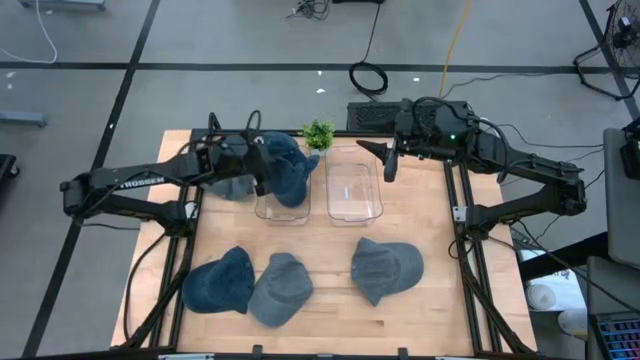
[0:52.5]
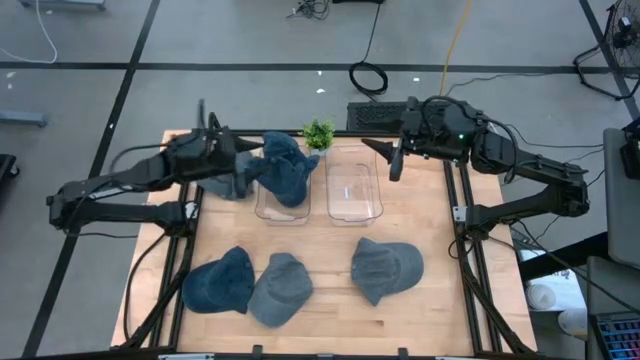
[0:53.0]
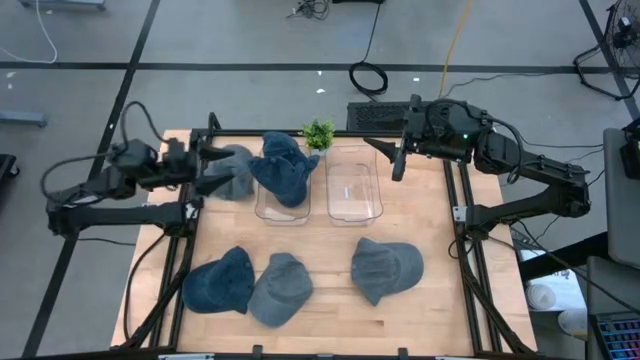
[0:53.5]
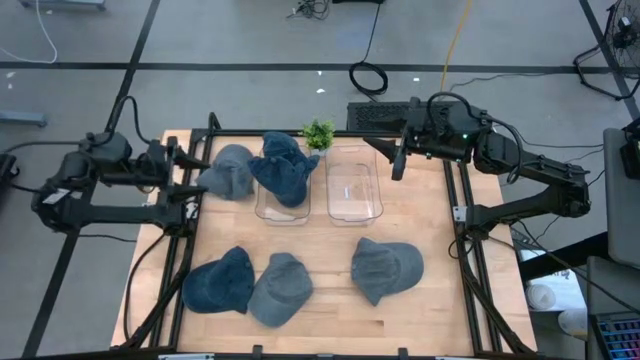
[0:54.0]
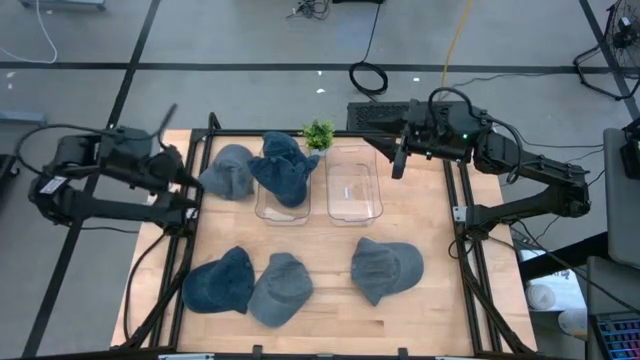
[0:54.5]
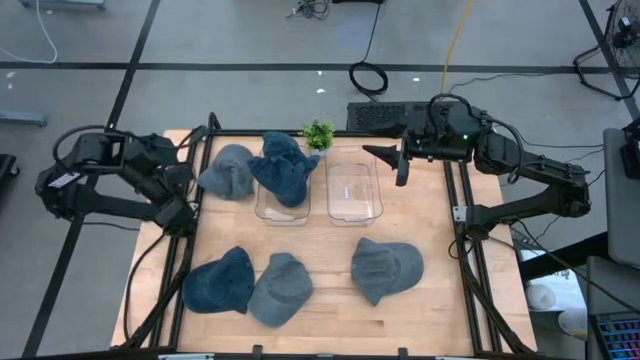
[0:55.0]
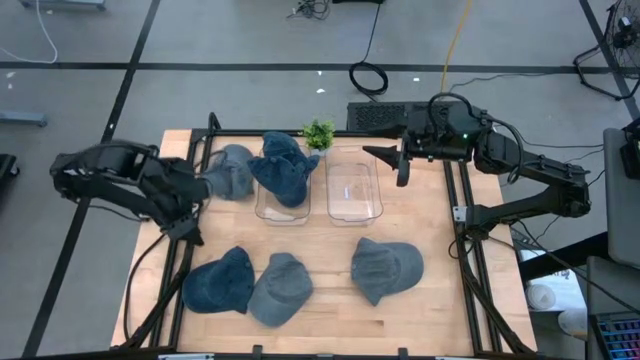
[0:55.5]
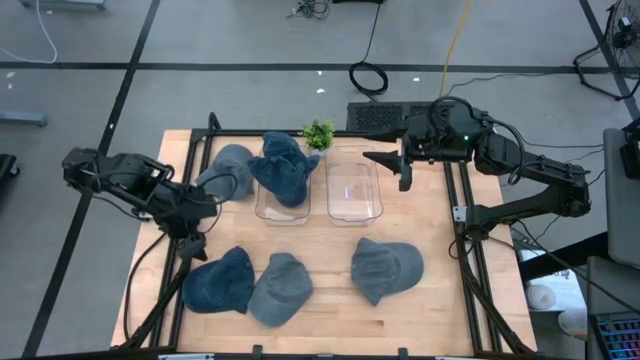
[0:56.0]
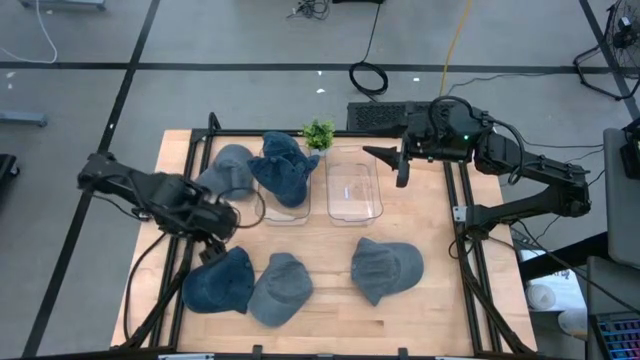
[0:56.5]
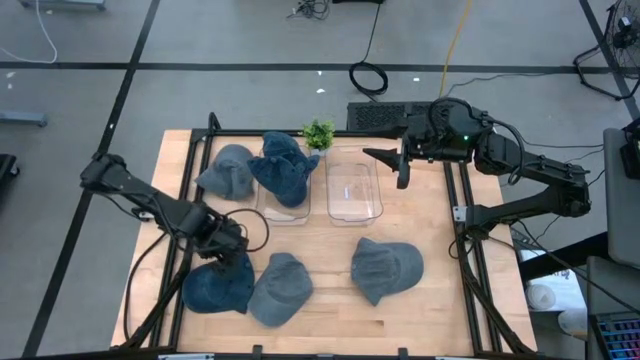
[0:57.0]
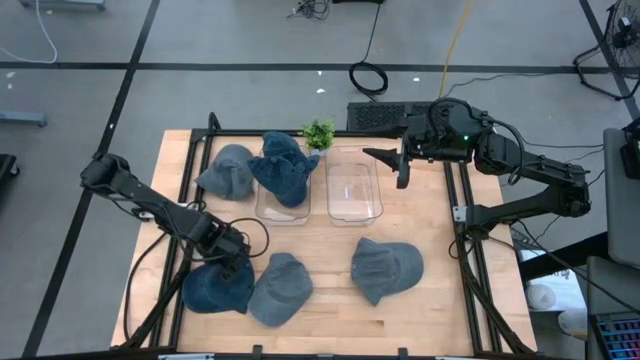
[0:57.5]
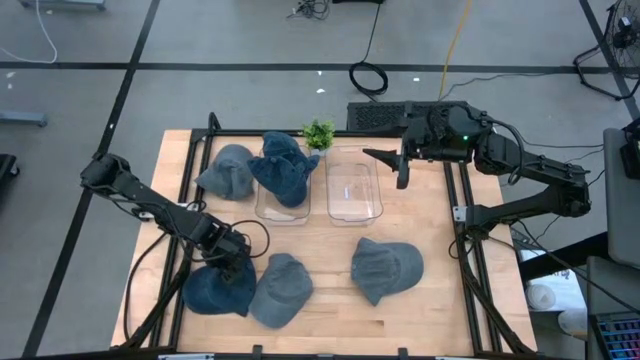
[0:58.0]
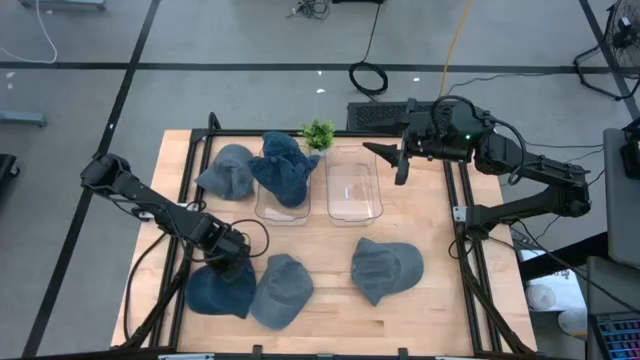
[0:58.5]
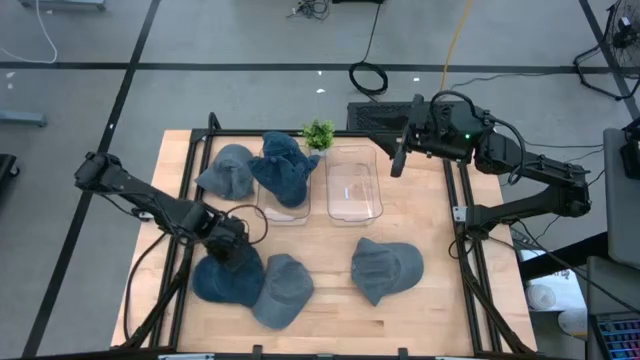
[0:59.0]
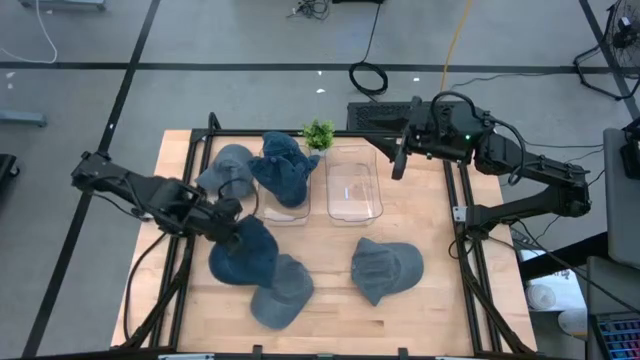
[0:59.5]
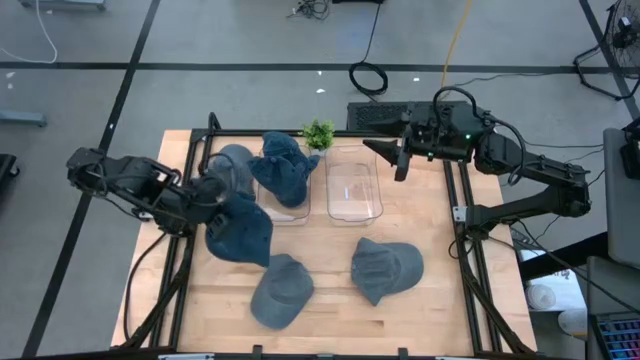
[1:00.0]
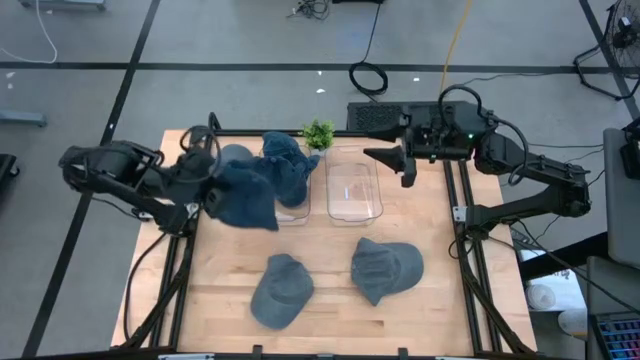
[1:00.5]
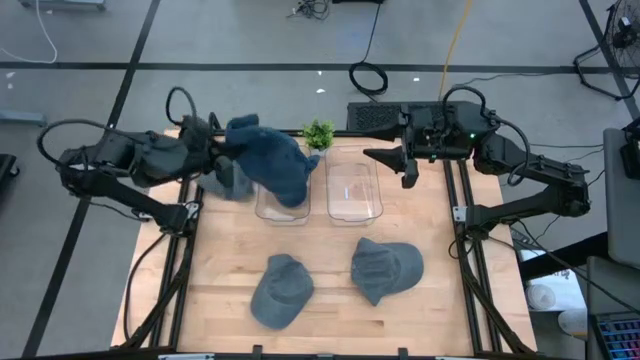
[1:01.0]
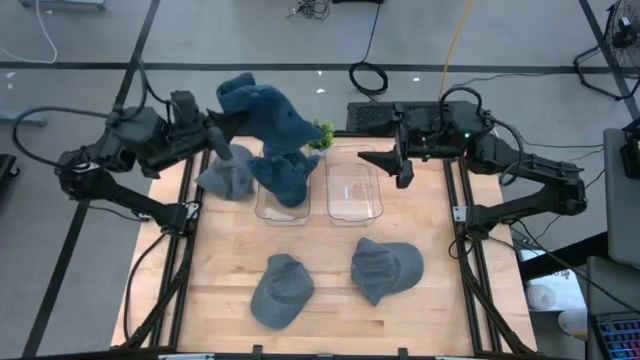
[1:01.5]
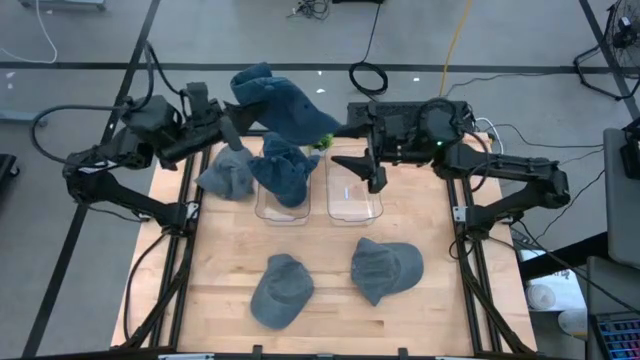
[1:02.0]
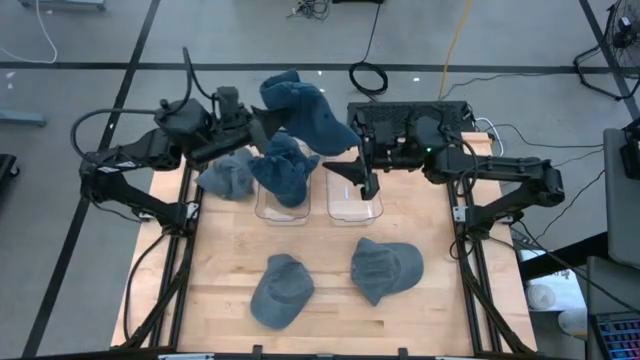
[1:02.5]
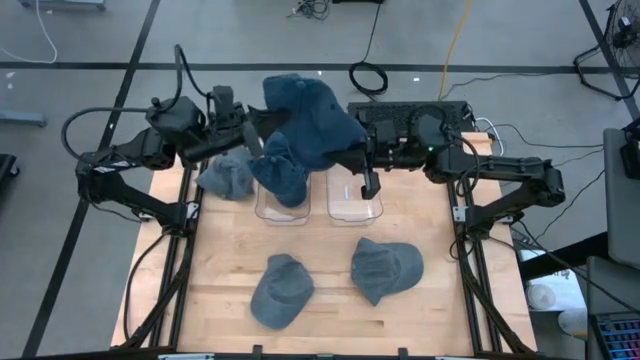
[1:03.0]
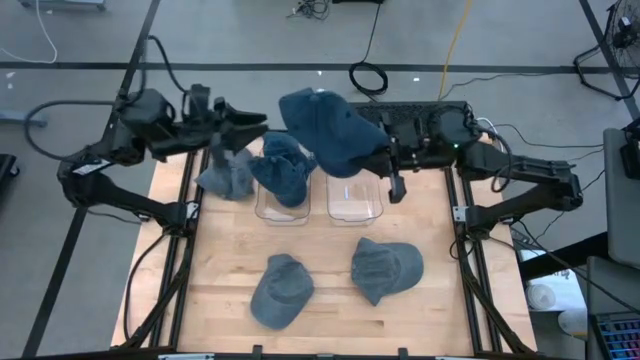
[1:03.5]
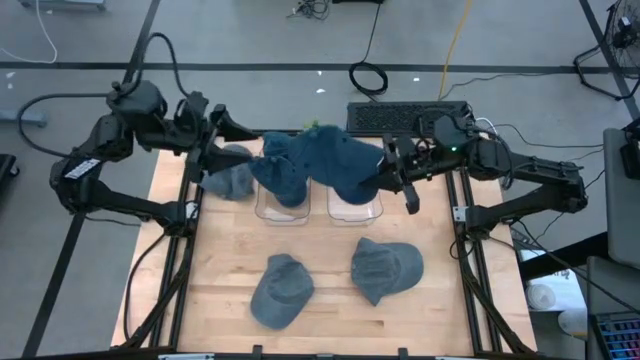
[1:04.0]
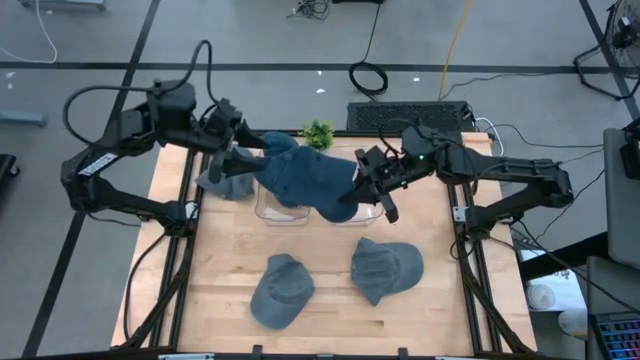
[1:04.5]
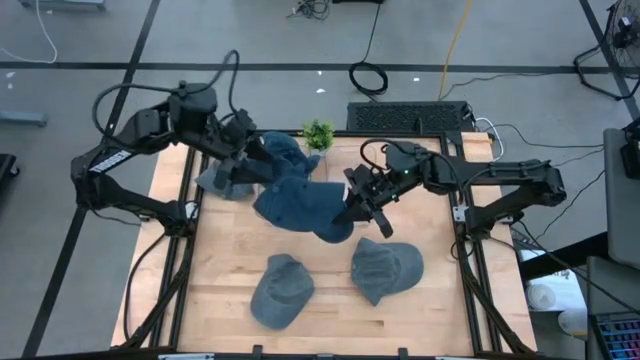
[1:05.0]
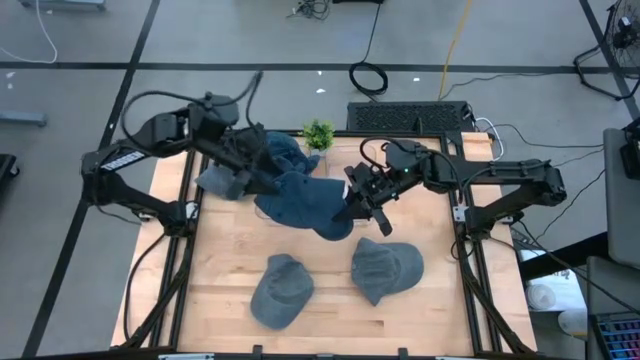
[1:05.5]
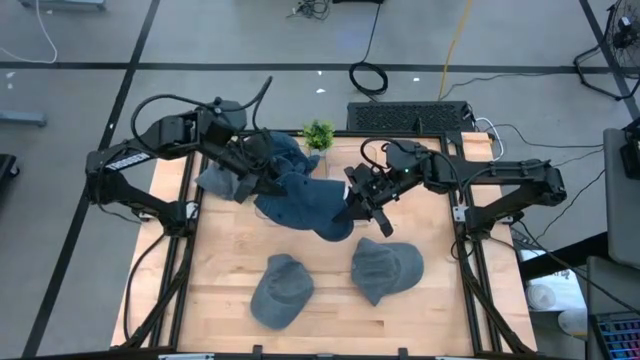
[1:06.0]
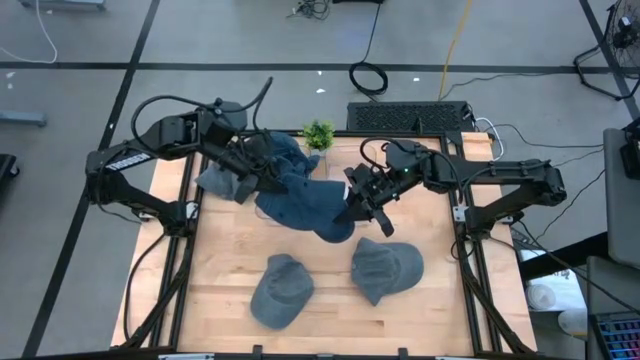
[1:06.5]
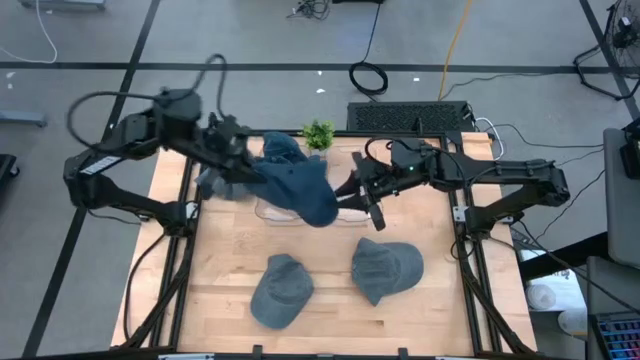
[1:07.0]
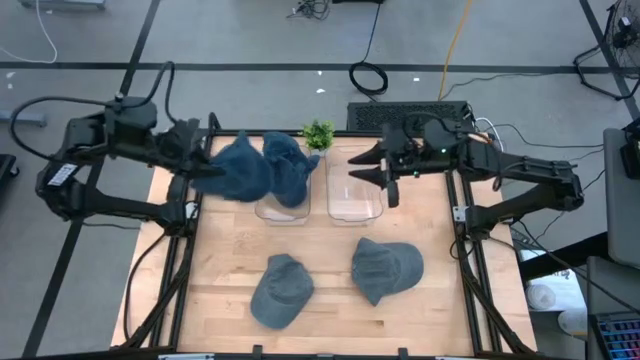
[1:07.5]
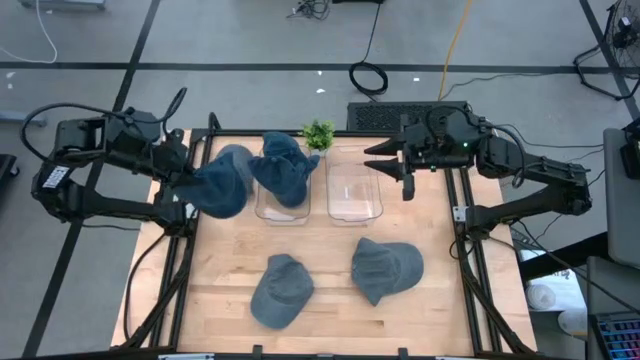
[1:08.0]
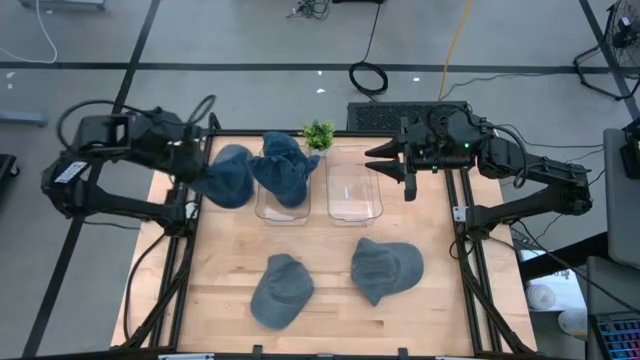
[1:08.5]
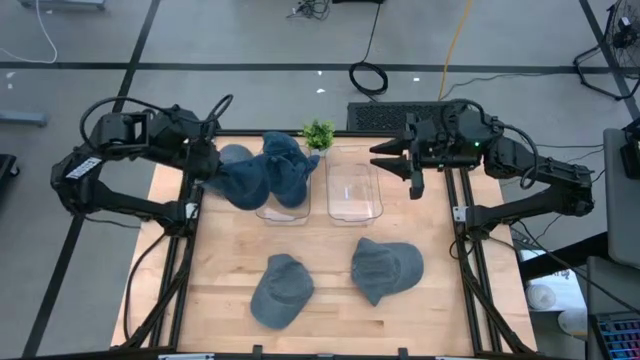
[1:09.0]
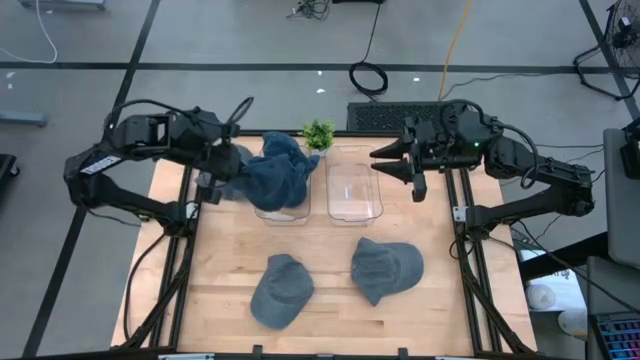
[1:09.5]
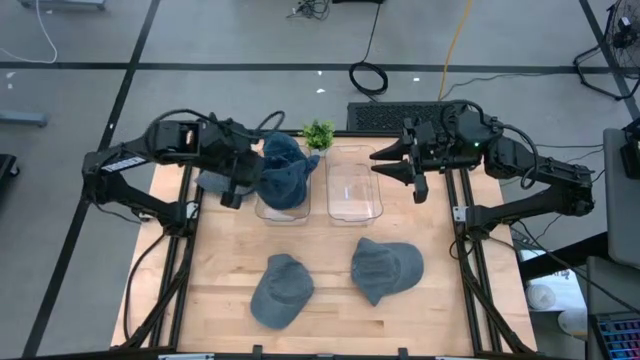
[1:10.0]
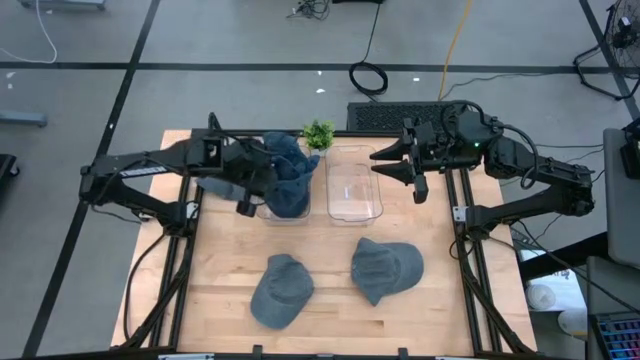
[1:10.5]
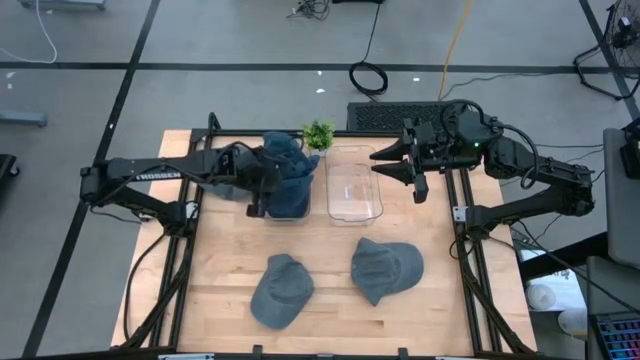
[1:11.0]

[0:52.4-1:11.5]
Task: Pick & Place hat
Put the blue cap into the left transparent bin

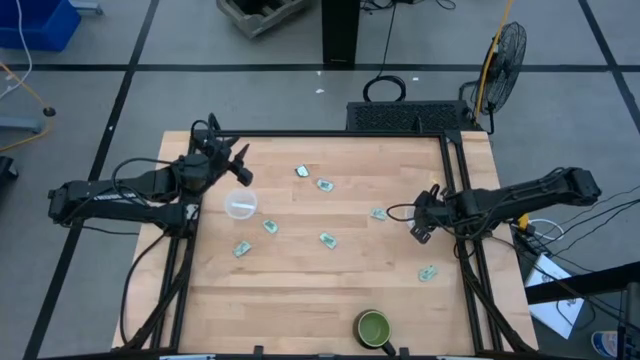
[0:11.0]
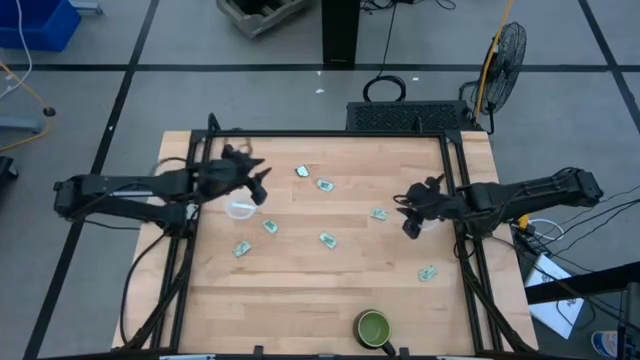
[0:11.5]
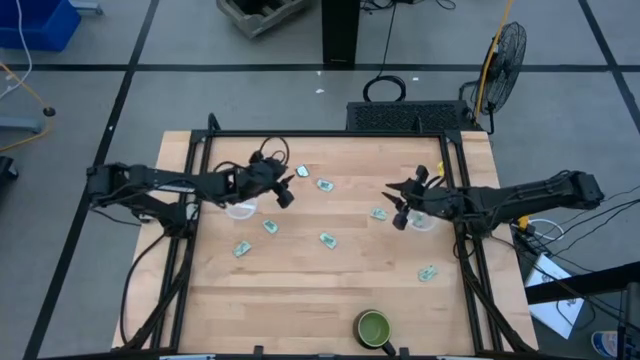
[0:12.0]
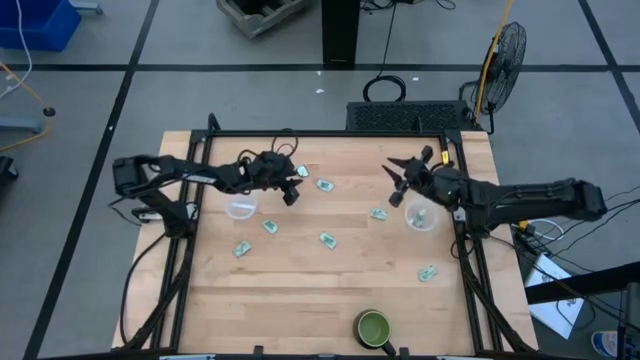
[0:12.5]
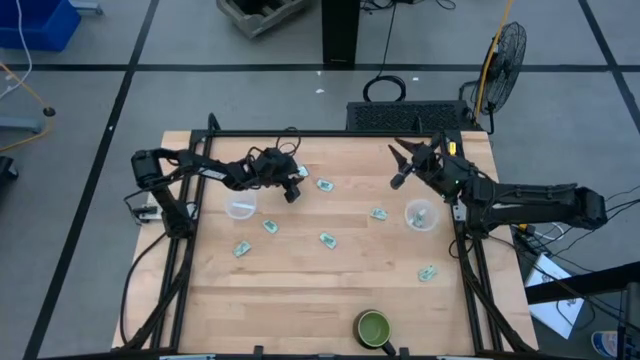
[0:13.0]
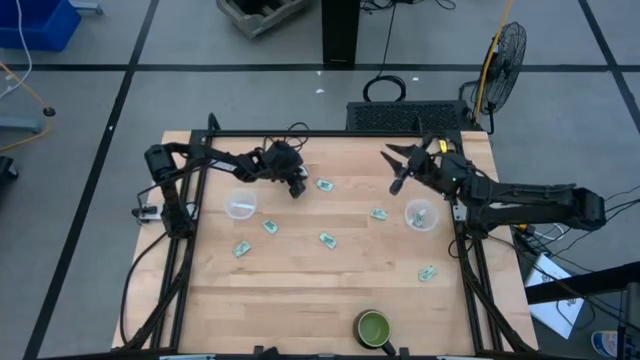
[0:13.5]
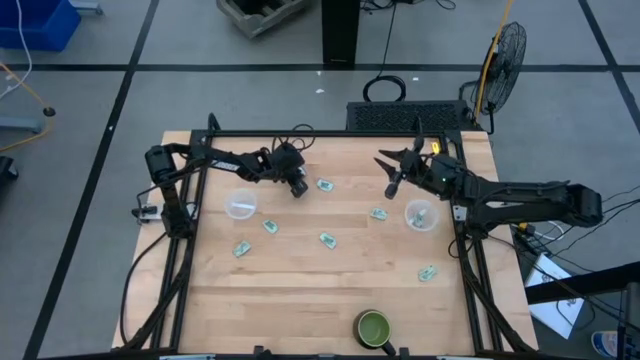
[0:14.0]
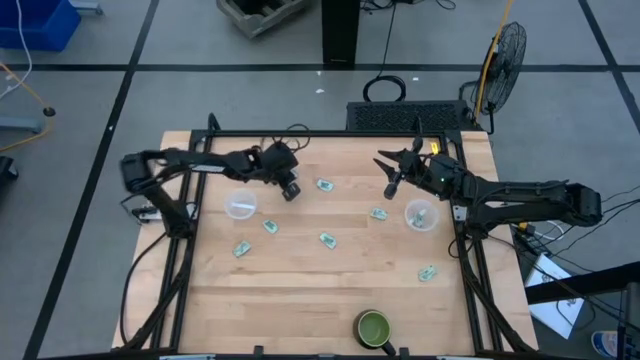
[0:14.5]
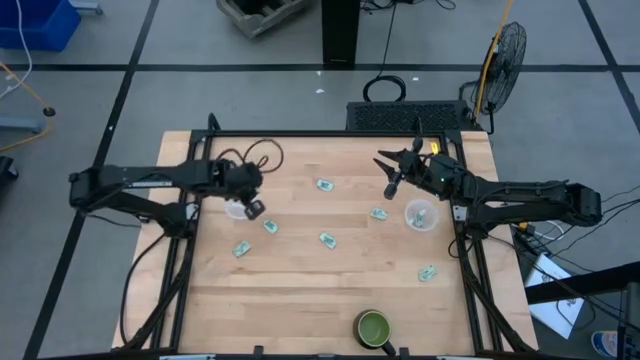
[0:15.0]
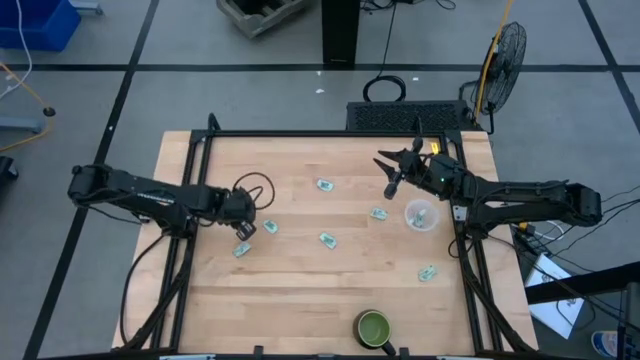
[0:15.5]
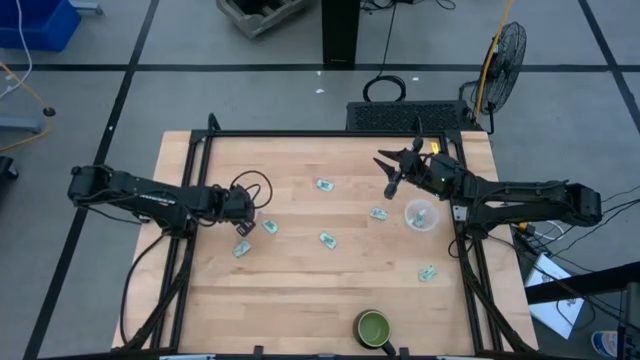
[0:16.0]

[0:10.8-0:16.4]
Task: Pick and place Stevia / Truvia into bins
Put the stevia packet into the left transparent container
